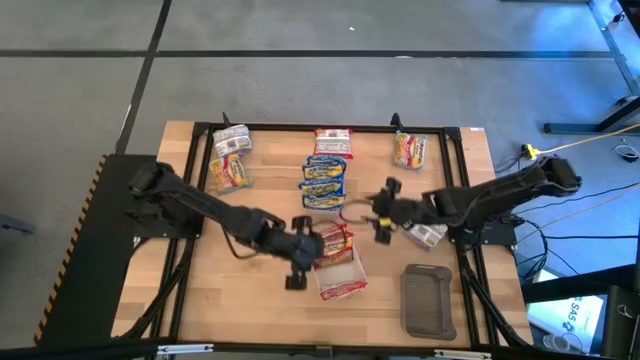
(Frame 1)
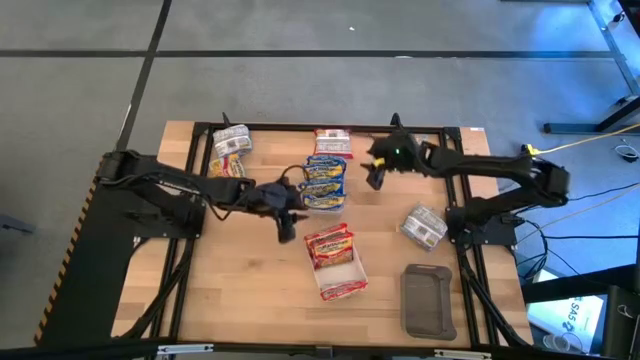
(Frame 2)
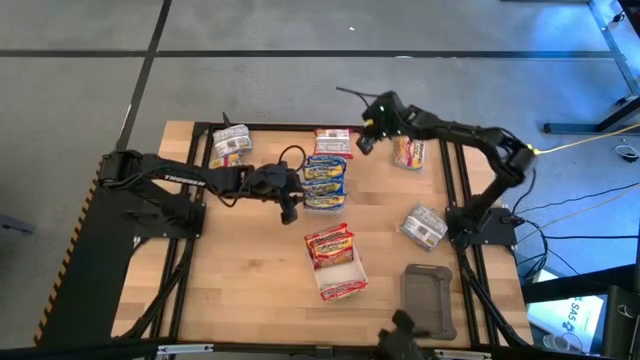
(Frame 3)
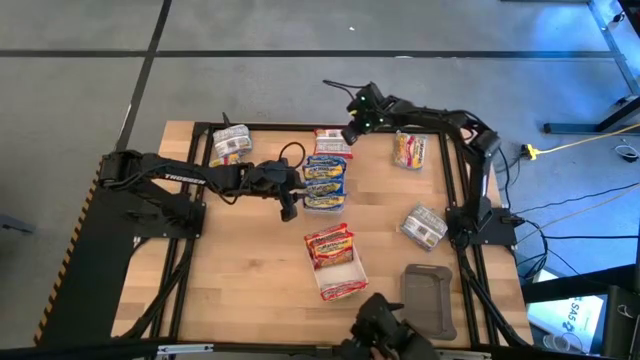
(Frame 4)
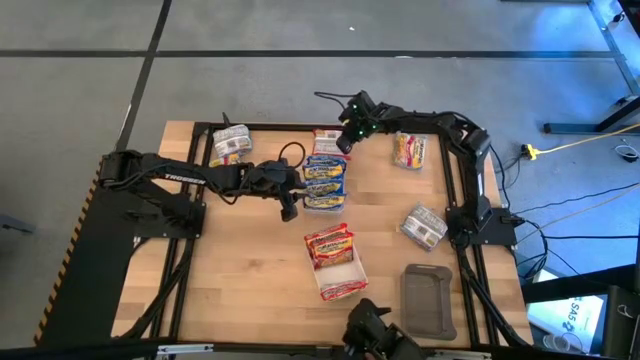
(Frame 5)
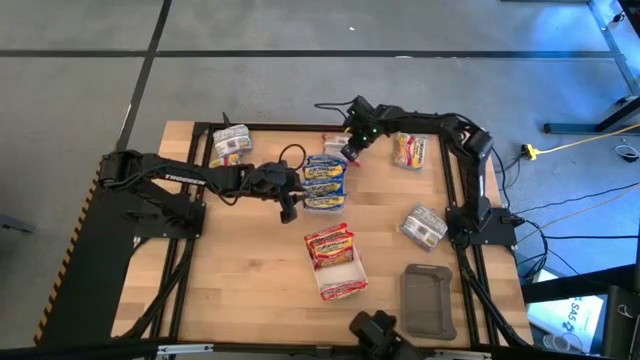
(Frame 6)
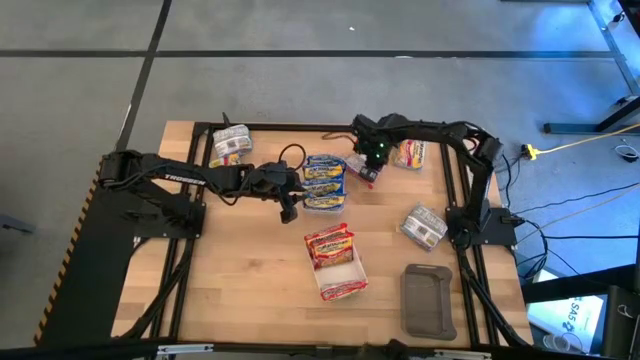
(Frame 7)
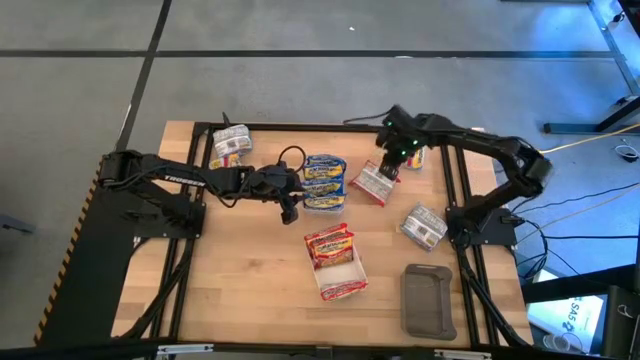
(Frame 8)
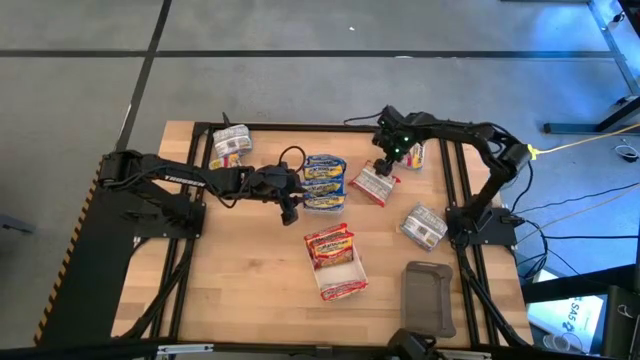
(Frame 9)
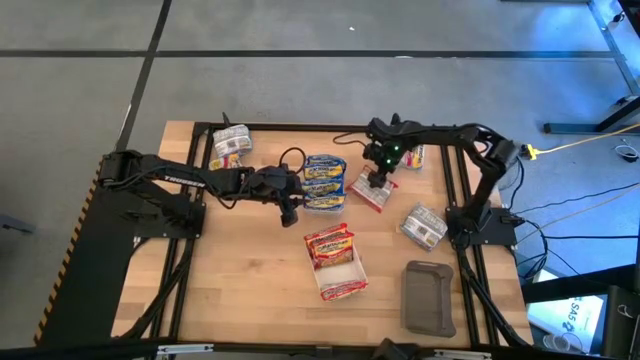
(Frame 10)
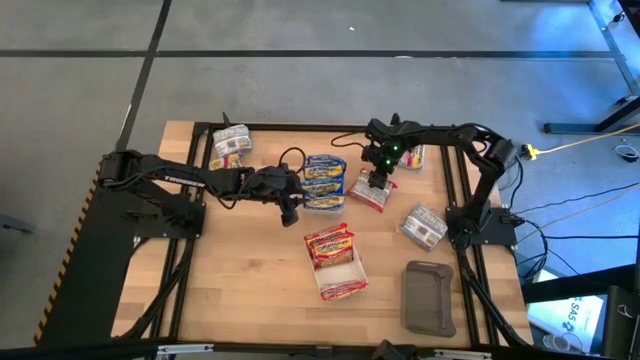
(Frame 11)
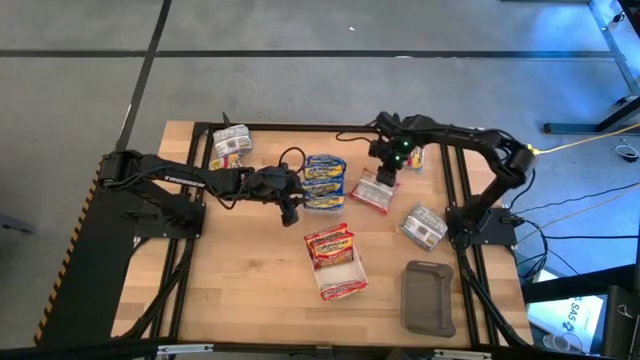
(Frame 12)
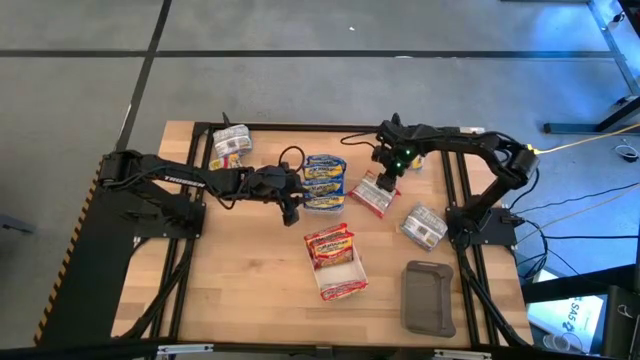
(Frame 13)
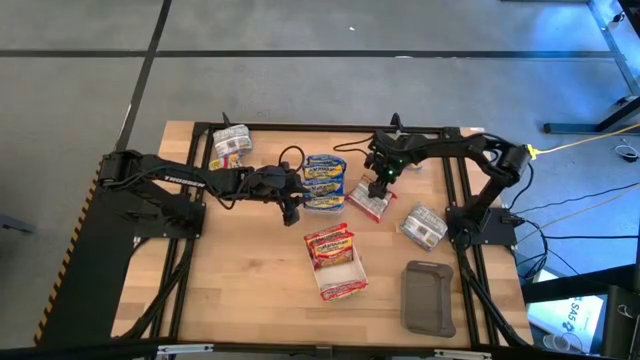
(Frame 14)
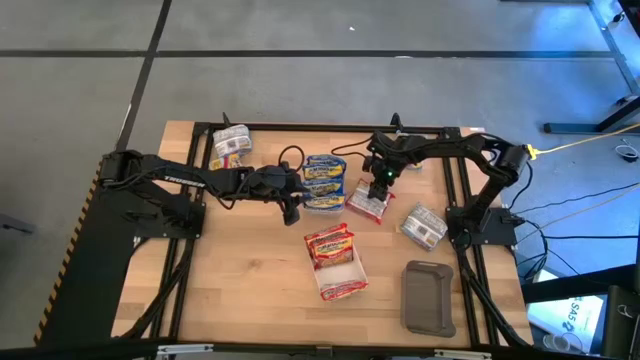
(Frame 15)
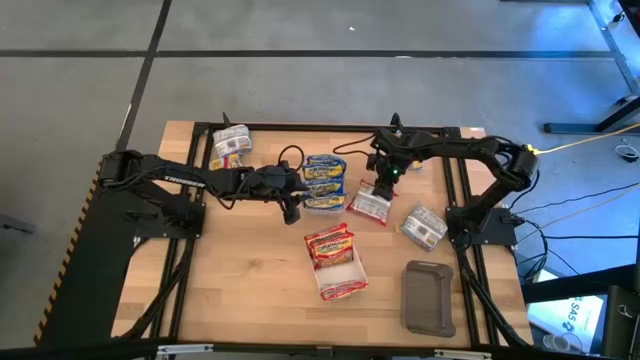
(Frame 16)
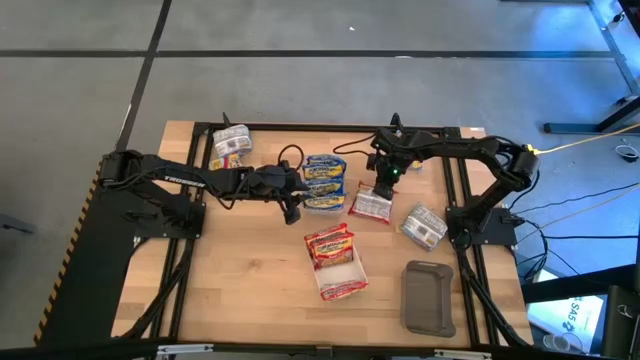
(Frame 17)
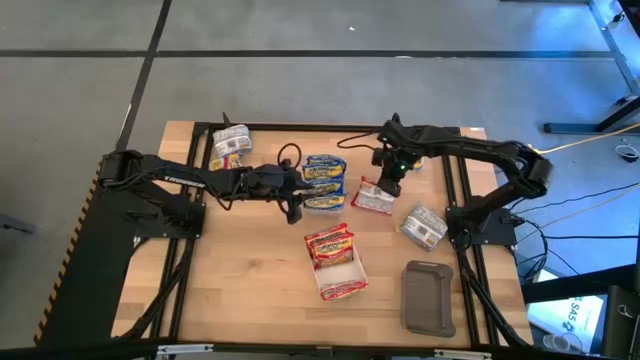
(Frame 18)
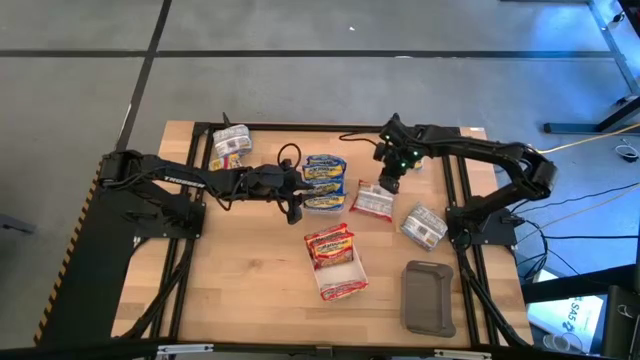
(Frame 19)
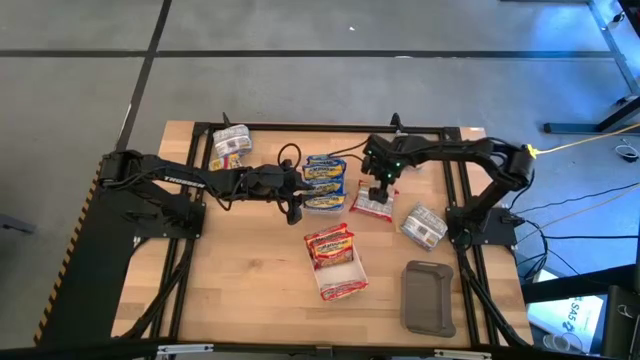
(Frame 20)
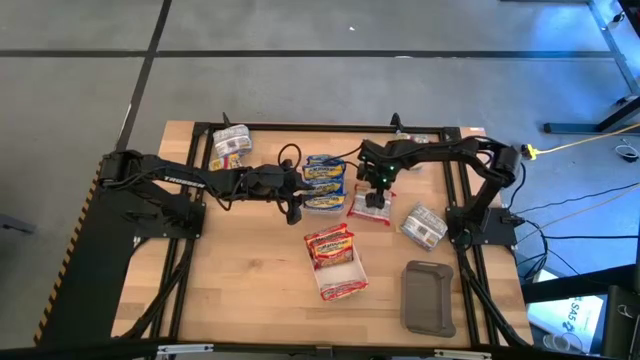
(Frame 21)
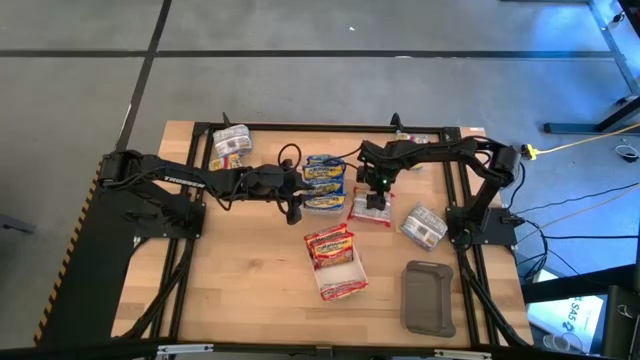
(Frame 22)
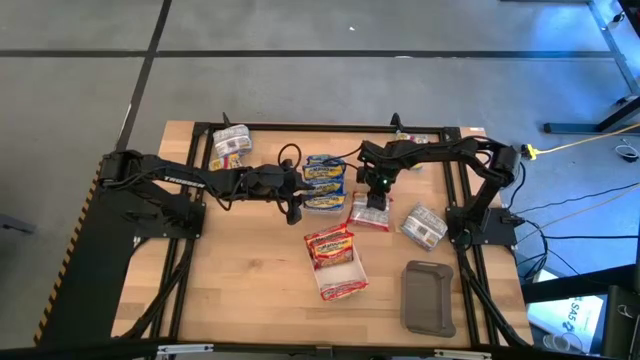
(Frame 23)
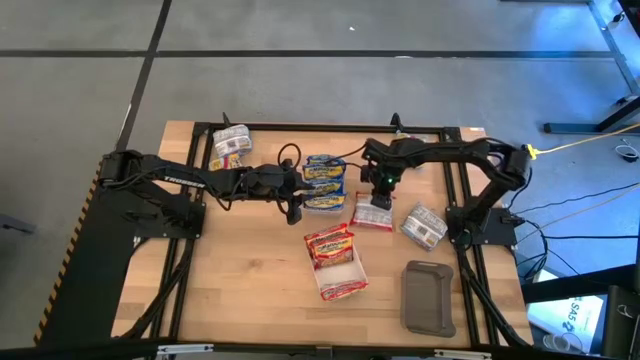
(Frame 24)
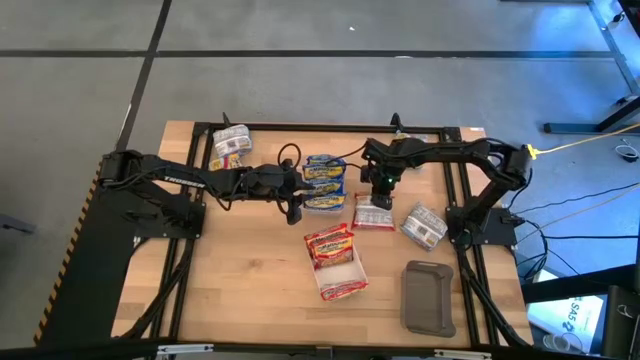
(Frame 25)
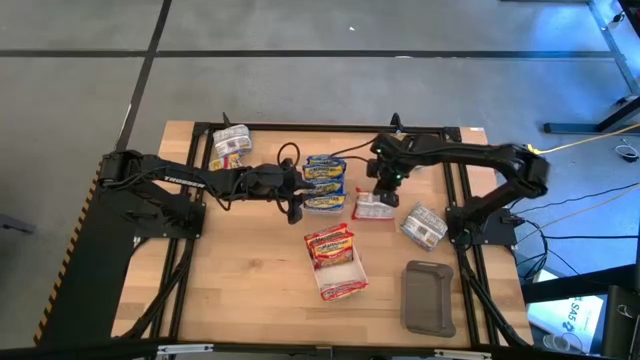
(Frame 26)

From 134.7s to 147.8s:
Task: Sort Maruchan noodles
Put the red noodle pack into the white bin

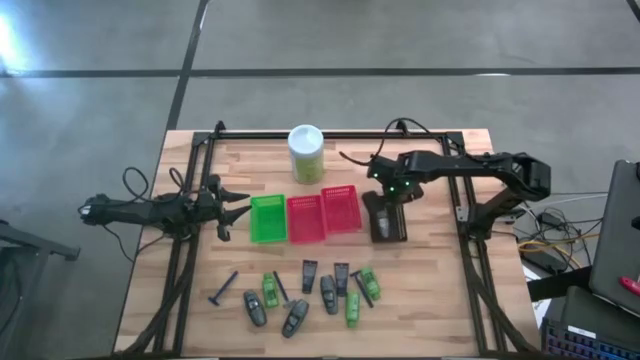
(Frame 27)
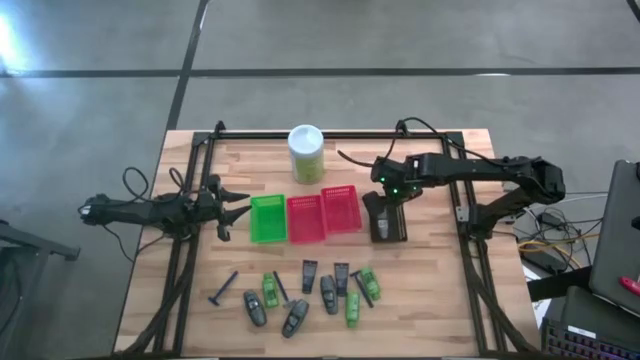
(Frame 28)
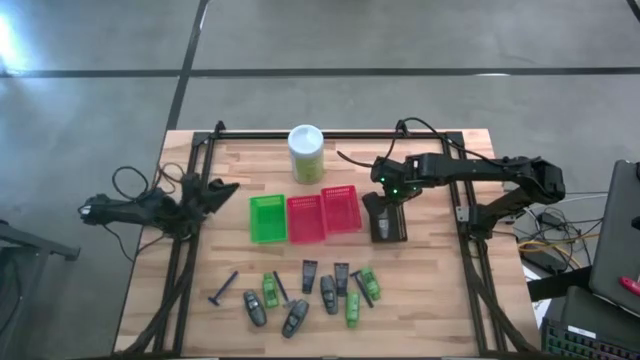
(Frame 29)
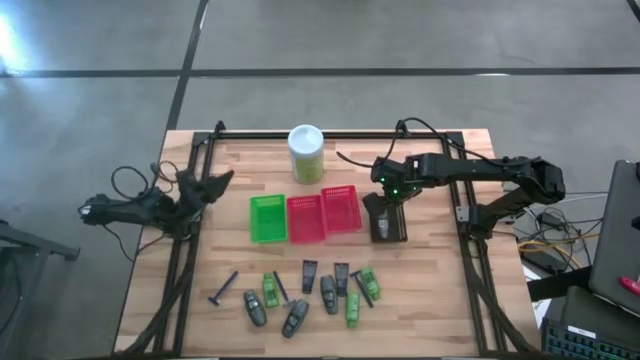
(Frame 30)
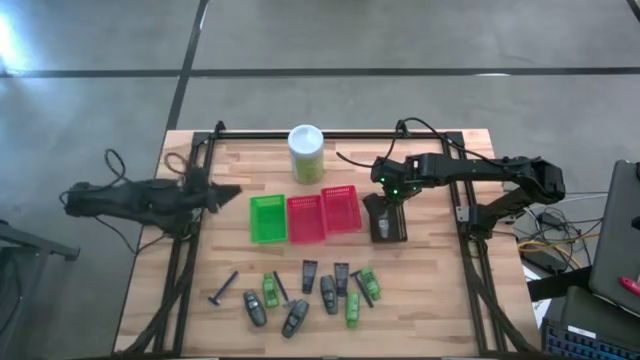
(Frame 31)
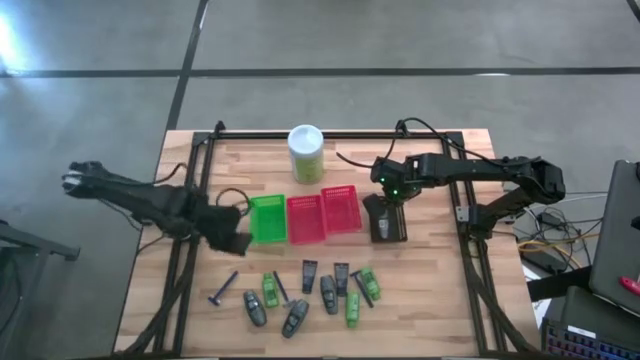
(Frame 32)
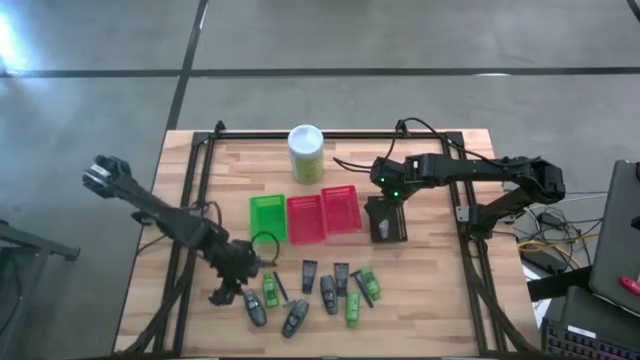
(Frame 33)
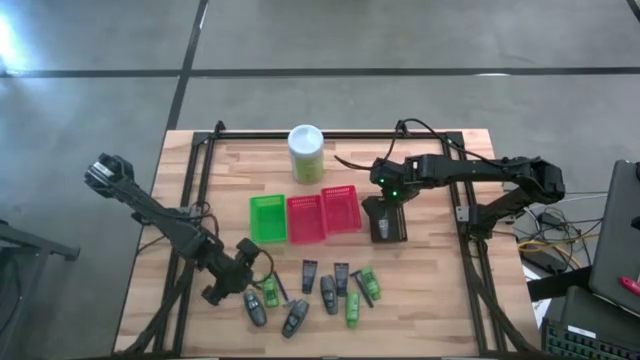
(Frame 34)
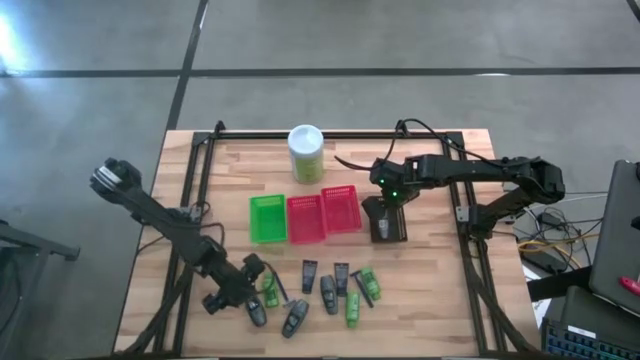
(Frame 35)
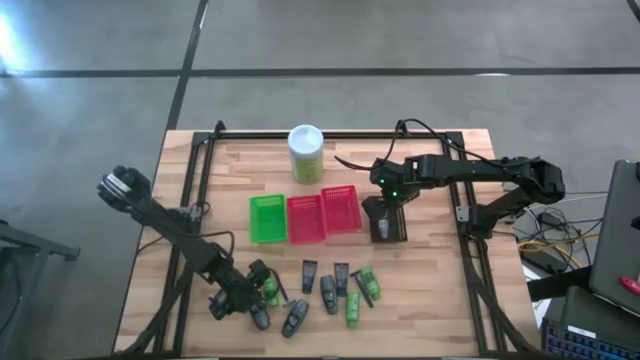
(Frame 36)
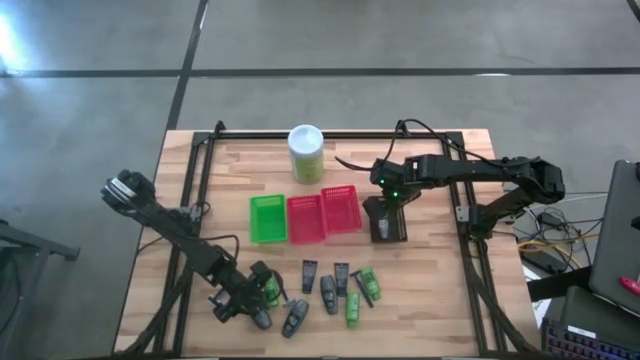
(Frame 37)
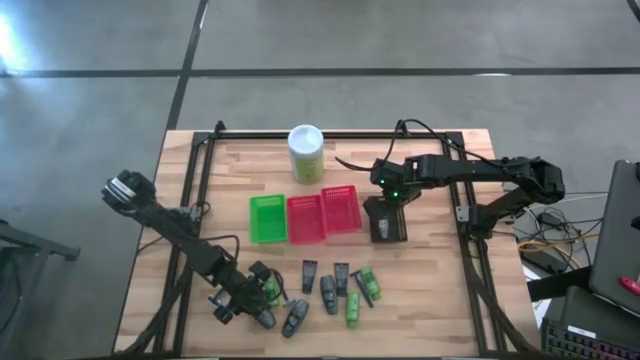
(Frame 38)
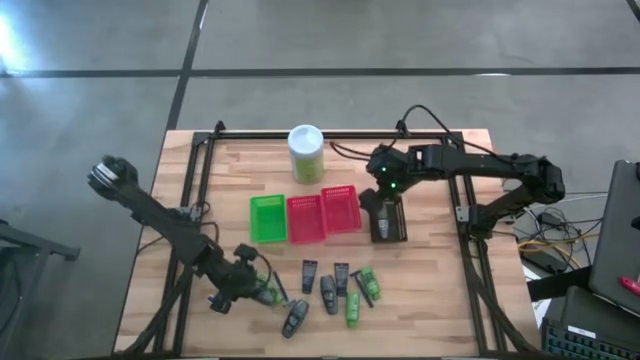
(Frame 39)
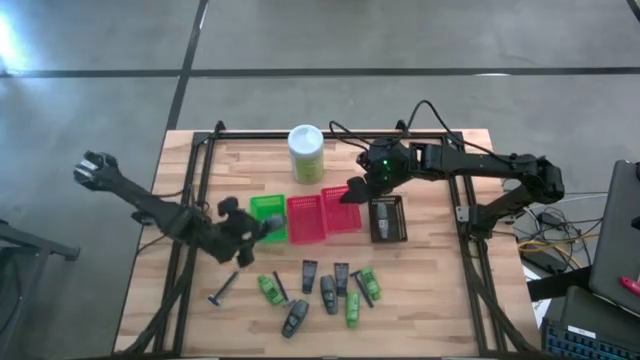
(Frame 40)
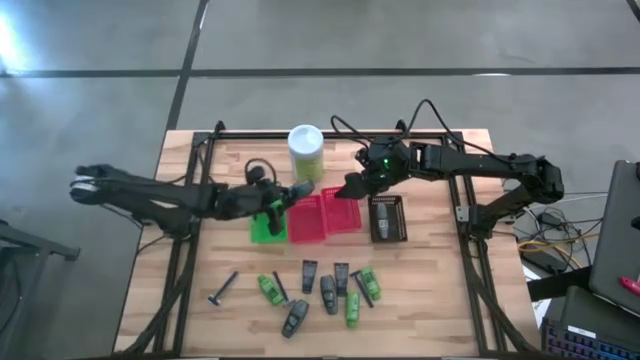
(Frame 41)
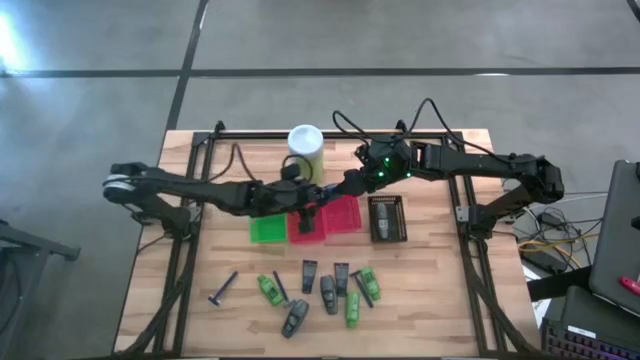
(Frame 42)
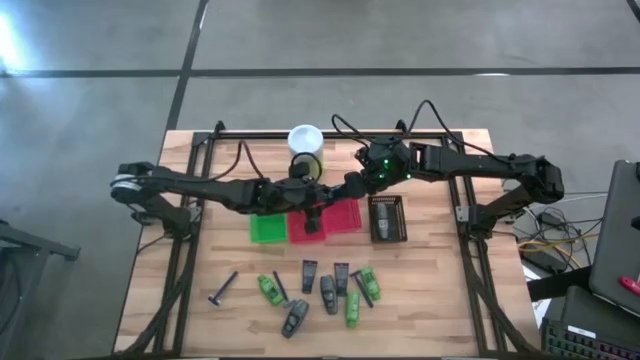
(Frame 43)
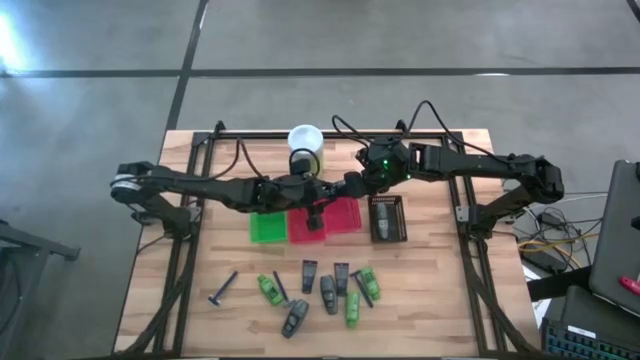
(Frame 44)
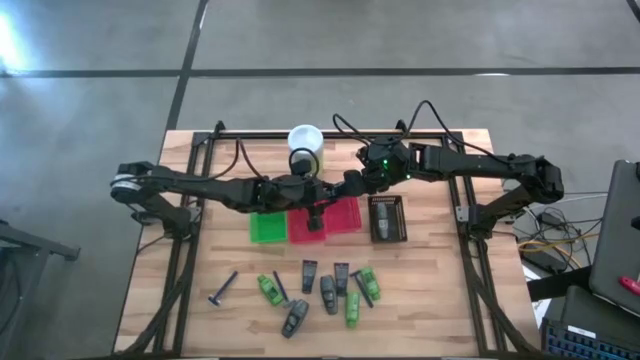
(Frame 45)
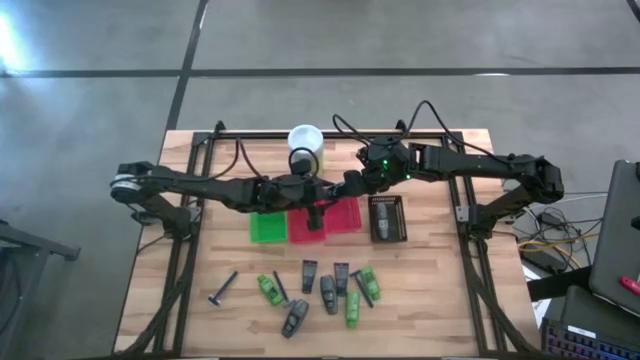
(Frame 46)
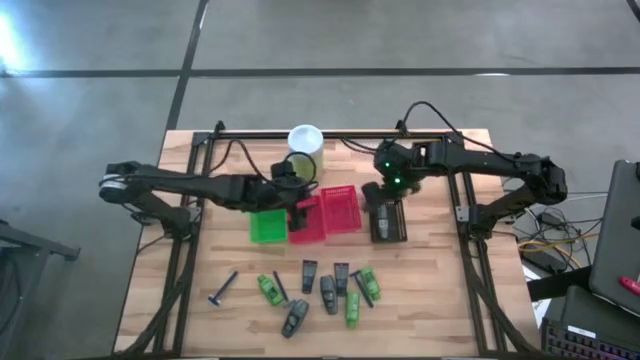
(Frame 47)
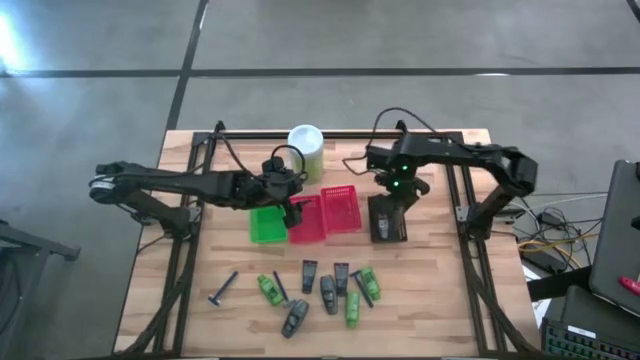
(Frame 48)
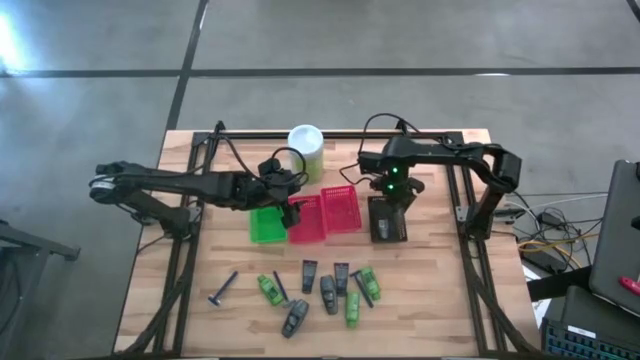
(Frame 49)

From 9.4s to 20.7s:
Task: Pick & Place Travel size toiletries
Put the black deodorant into the black bin
